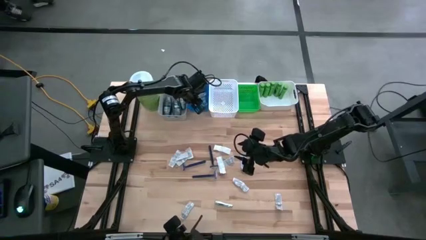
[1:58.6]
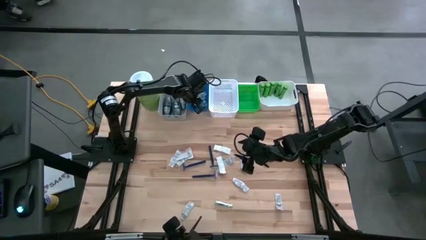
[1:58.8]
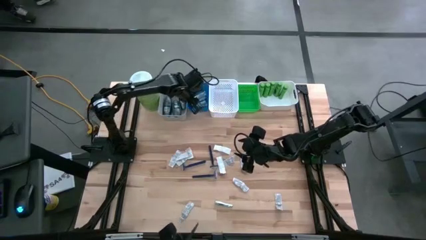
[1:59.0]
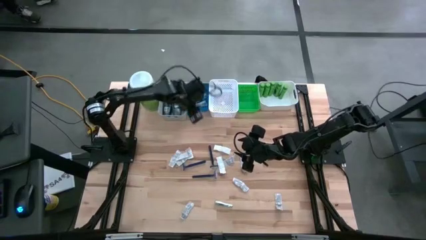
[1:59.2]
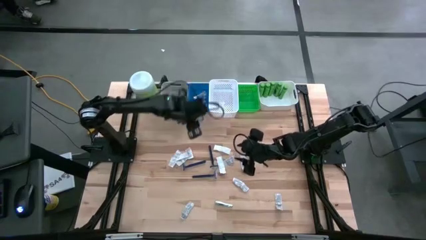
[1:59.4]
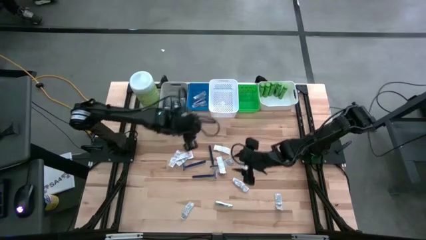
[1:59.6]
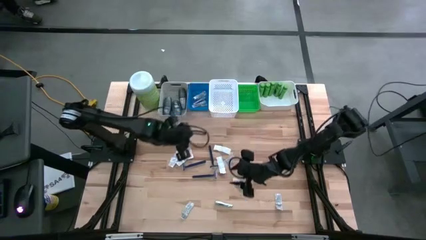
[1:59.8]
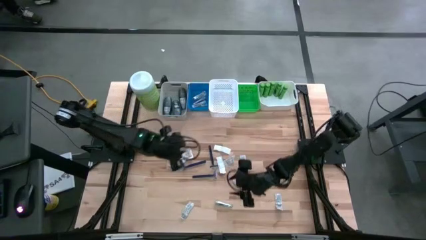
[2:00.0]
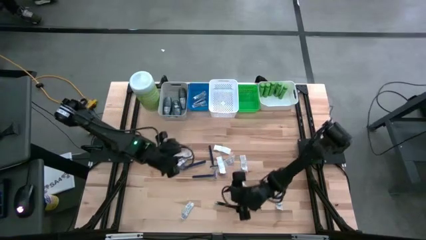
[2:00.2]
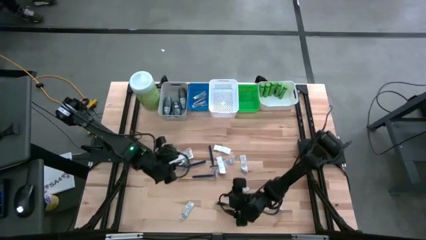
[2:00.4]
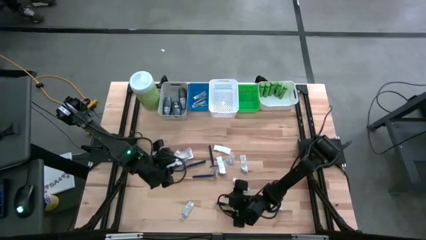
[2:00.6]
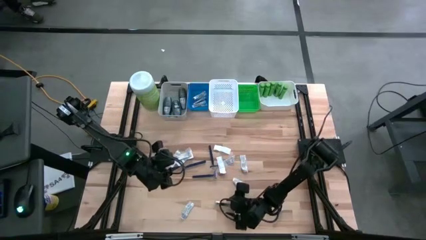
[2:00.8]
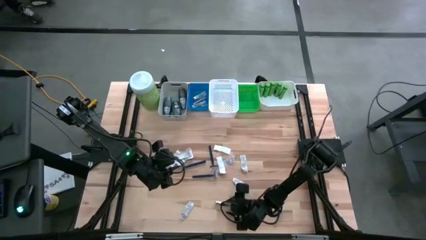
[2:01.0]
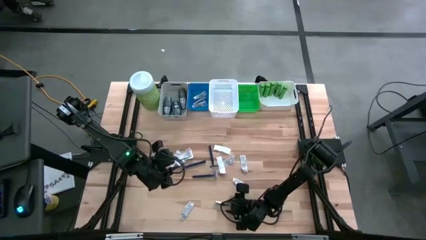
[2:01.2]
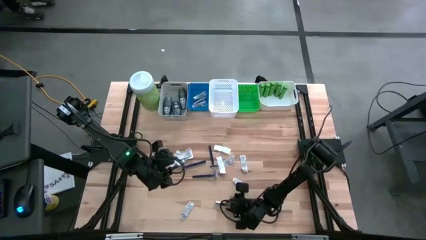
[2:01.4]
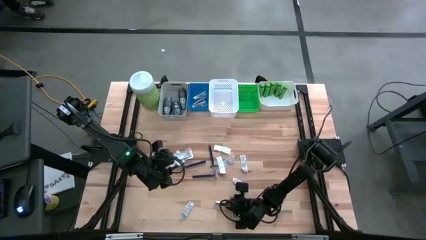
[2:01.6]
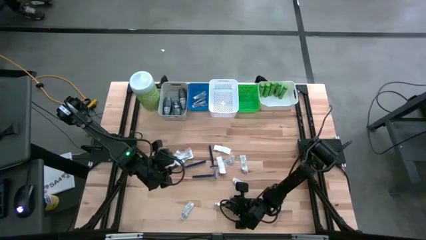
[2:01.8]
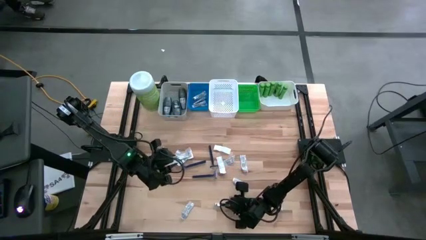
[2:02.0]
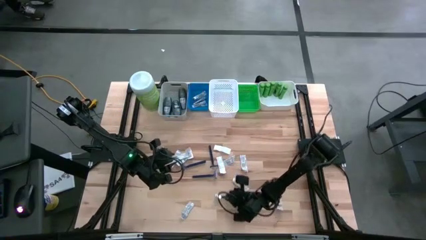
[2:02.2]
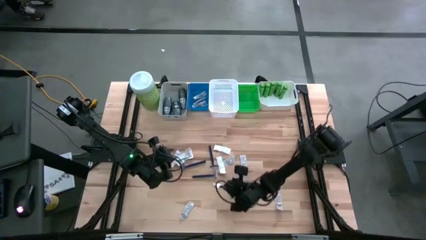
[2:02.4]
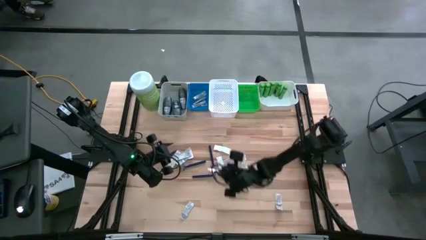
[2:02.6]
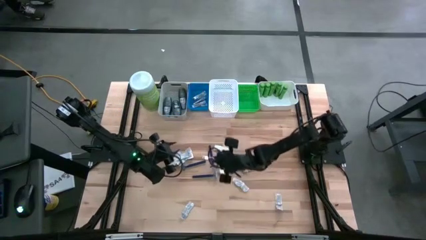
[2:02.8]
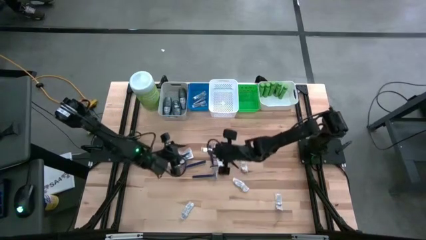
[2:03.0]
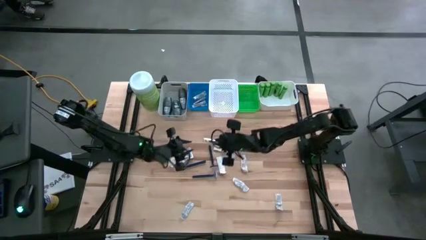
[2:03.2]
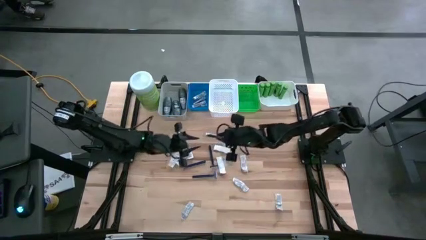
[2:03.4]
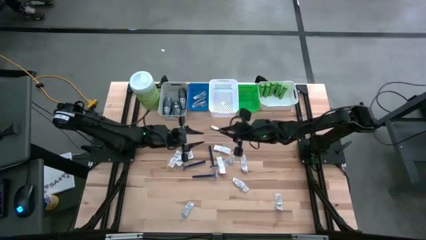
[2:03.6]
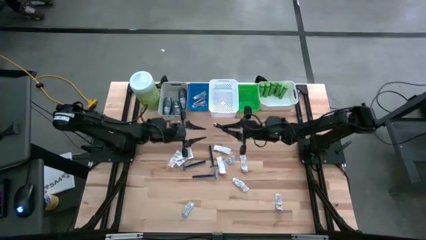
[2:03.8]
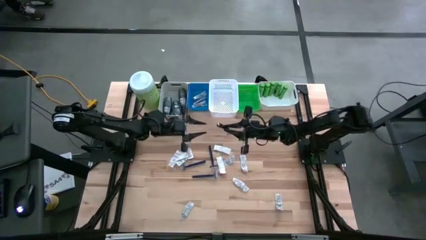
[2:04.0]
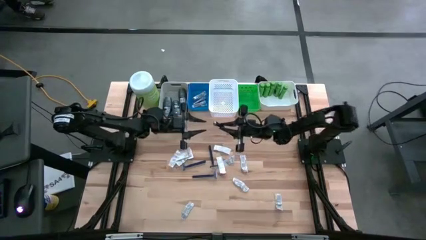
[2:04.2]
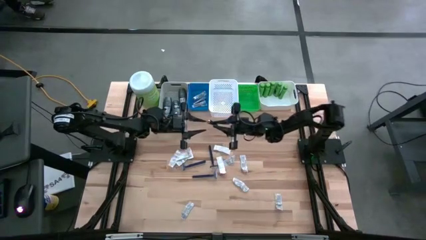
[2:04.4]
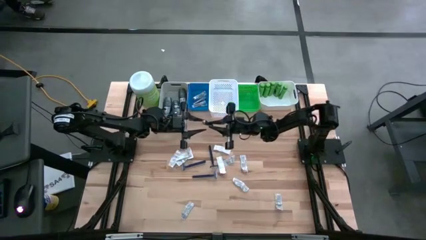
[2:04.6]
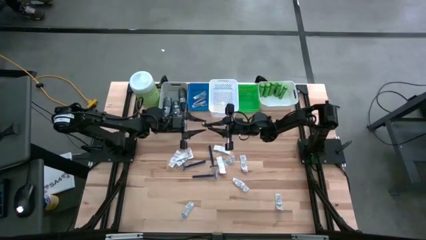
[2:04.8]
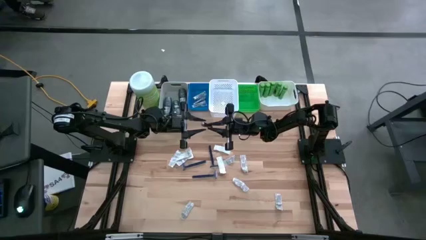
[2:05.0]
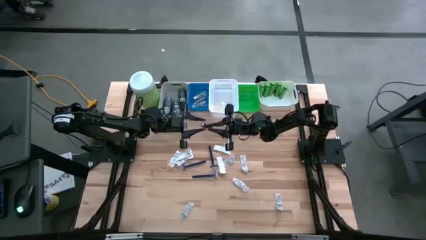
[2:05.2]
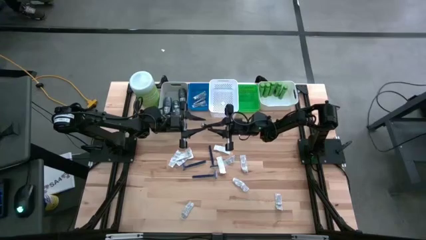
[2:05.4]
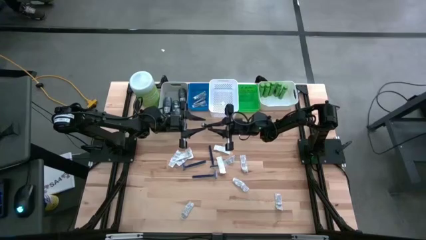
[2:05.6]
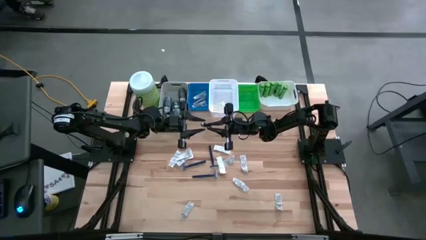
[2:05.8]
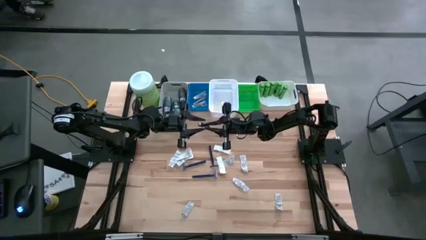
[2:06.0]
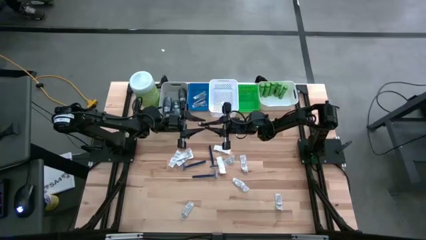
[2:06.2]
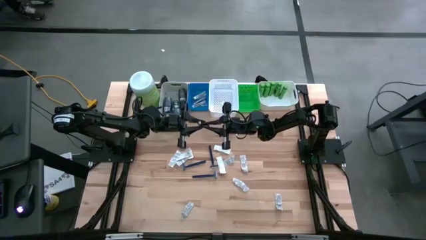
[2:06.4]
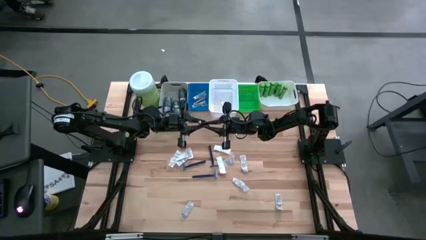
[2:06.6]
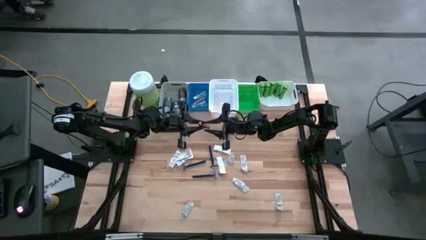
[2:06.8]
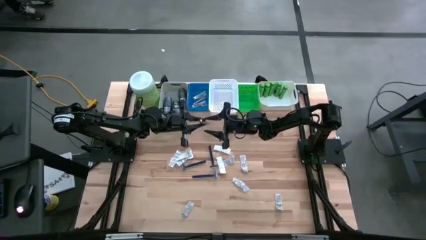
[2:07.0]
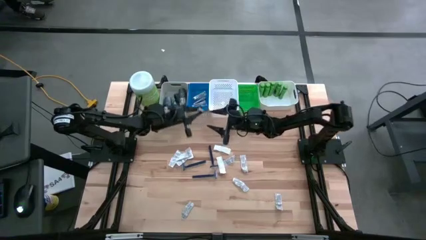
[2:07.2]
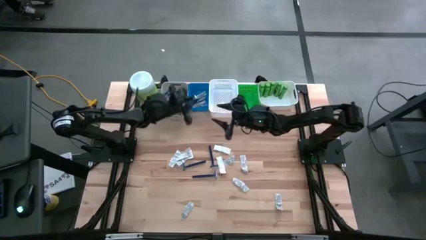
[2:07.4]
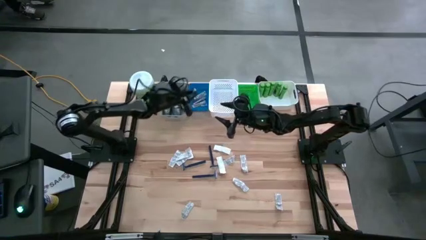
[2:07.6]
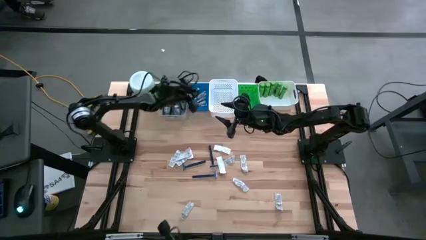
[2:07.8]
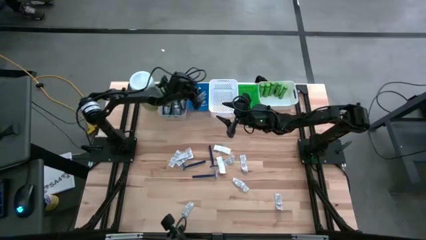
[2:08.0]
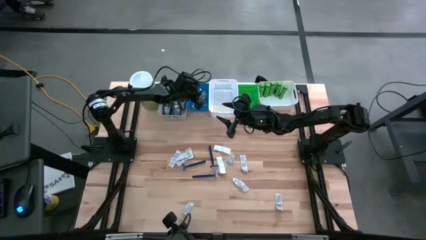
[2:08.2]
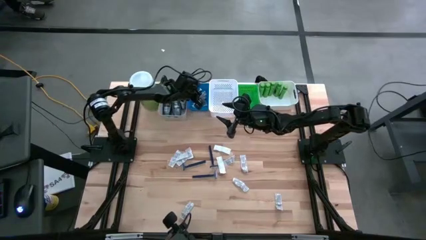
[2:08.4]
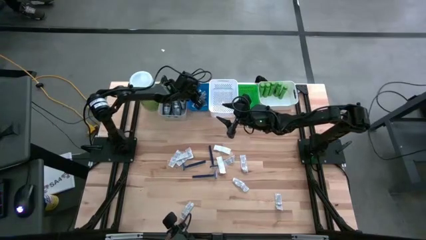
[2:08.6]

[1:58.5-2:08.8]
Task: Pick & Place Travel size toiletries
Put the silver nail cutter into the blue bin

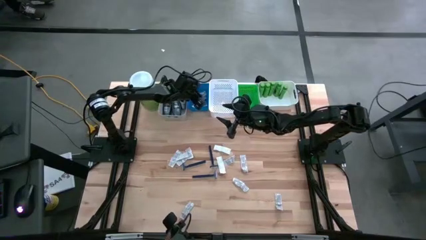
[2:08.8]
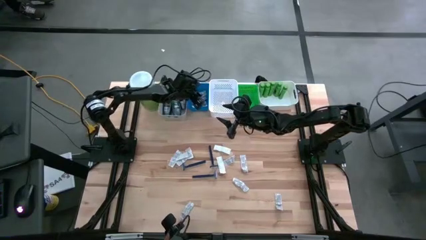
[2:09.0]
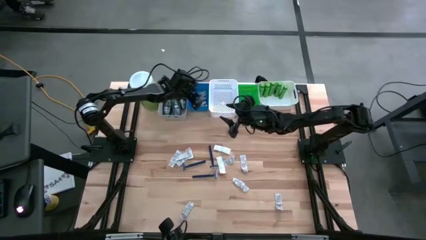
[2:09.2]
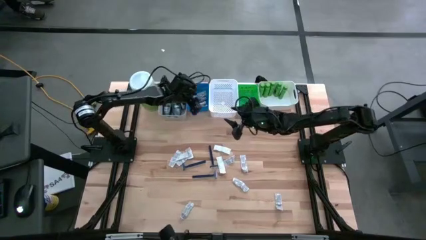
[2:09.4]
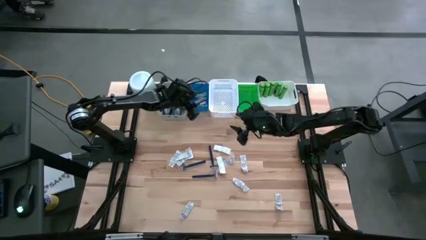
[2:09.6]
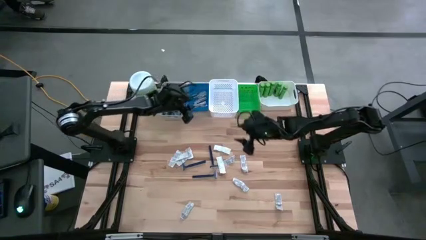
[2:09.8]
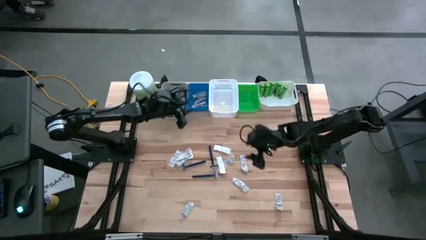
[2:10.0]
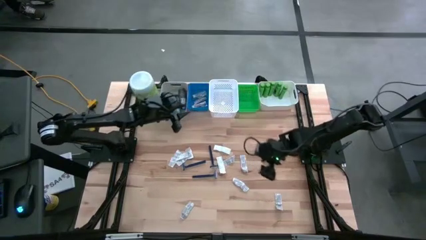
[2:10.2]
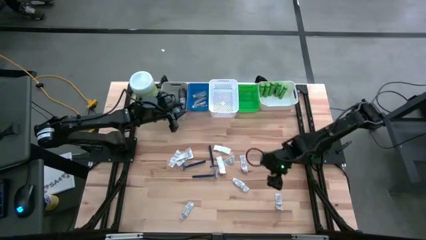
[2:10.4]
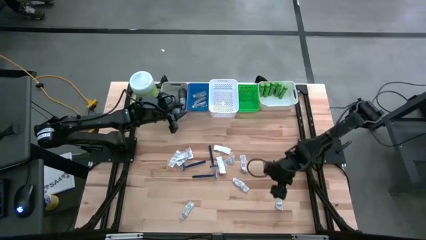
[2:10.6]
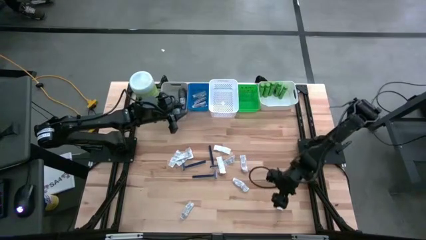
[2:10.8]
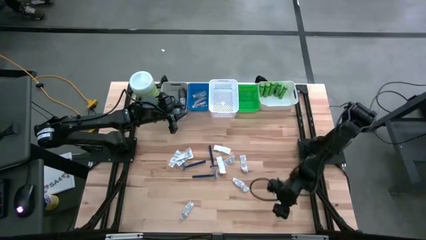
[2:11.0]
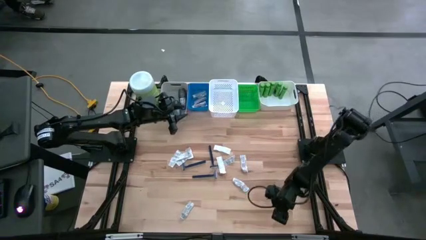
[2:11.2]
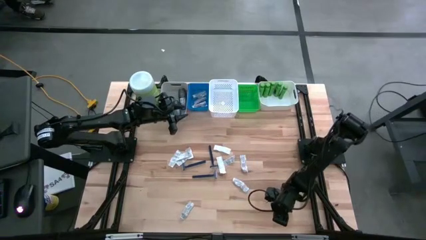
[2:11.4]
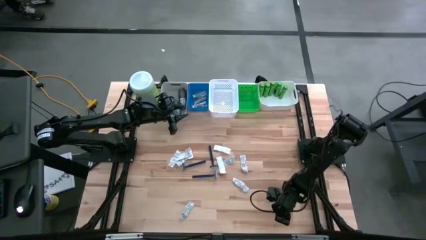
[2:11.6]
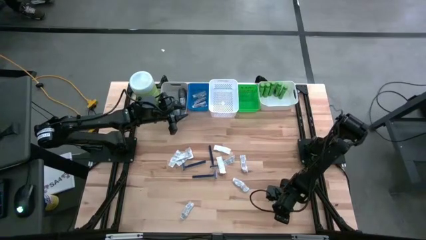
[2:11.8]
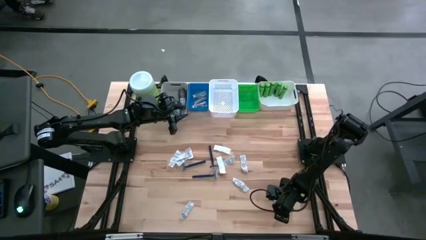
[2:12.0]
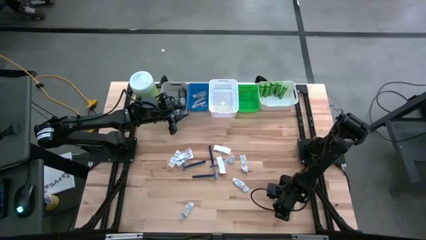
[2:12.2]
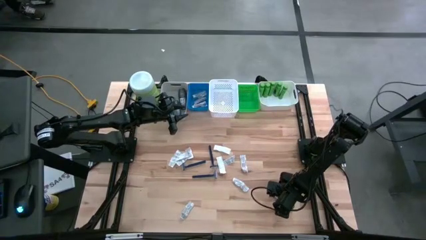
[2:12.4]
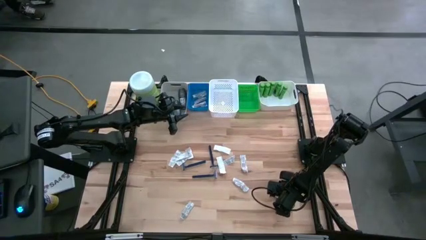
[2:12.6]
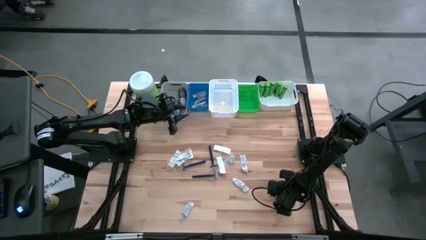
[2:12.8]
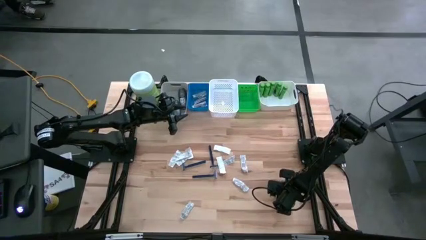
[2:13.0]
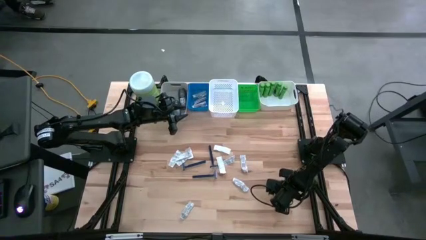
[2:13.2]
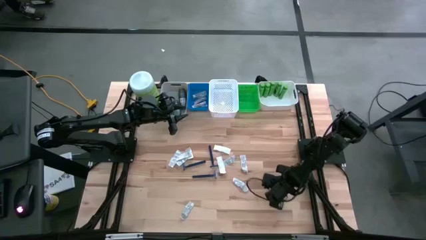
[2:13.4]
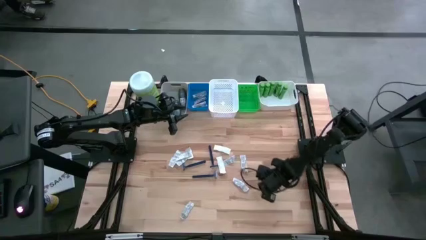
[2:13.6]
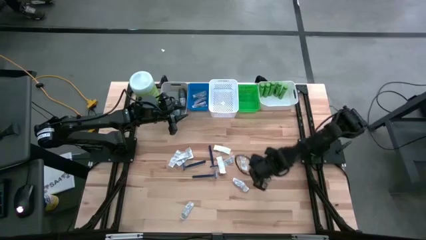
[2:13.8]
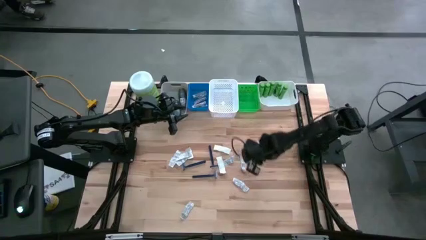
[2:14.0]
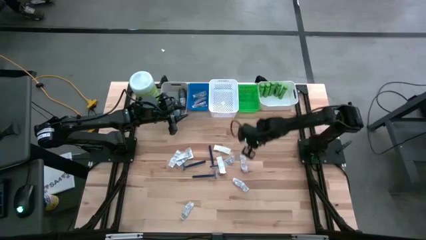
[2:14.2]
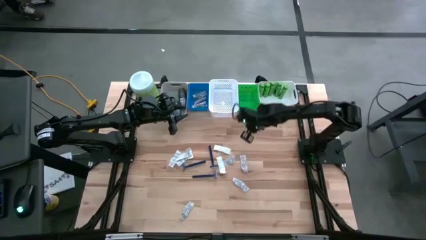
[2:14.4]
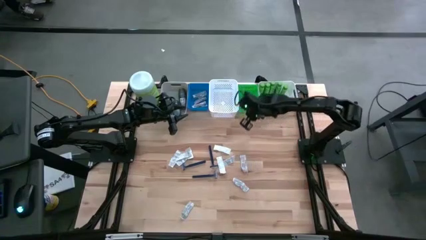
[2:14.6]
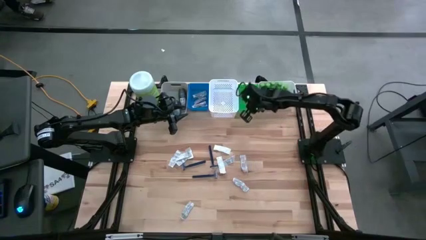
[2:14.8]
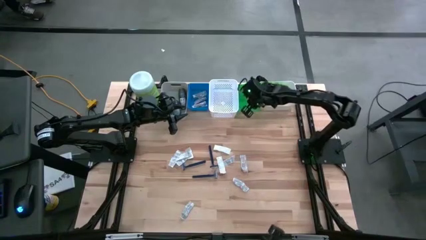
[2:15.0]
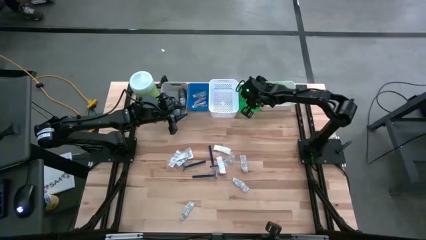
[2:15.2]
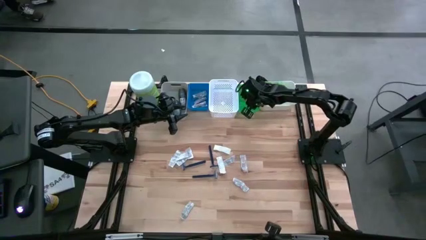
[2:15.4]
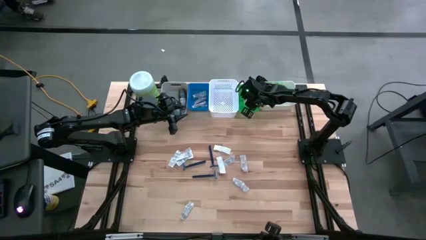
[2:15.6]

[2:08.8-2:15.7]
Put the white bandage pack into the green bin
